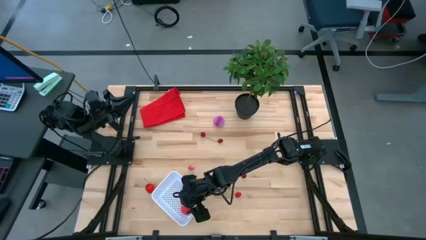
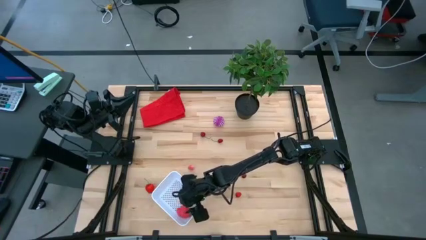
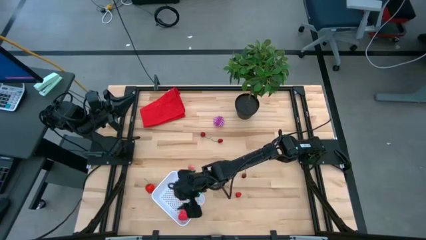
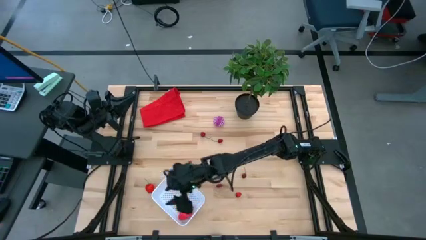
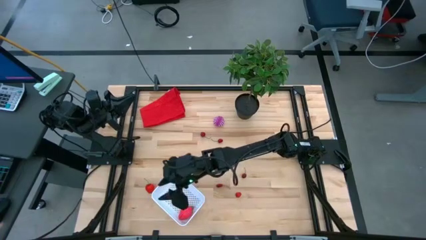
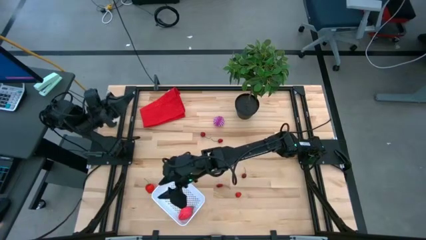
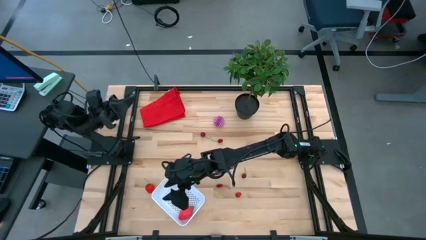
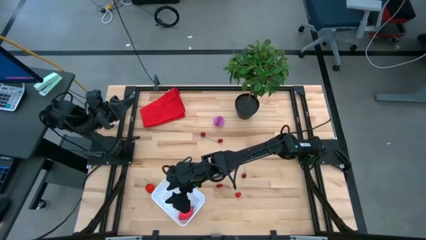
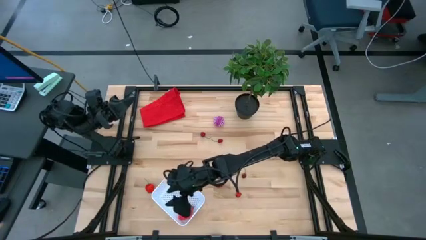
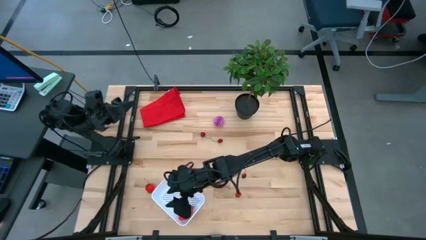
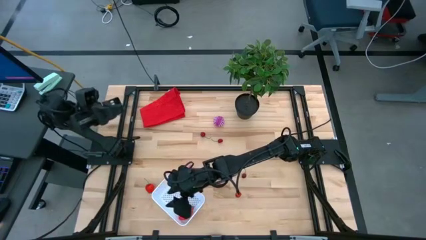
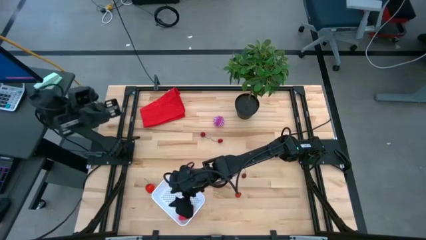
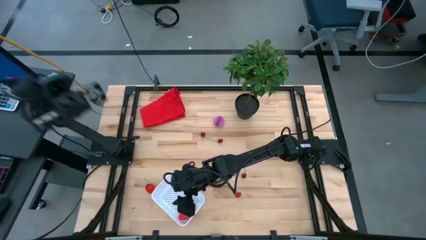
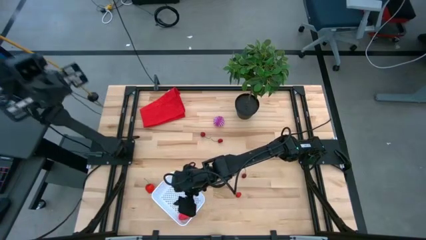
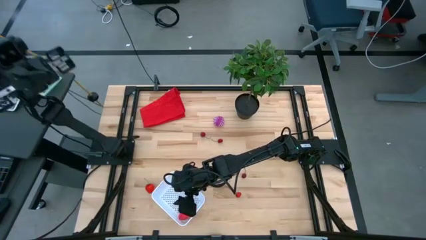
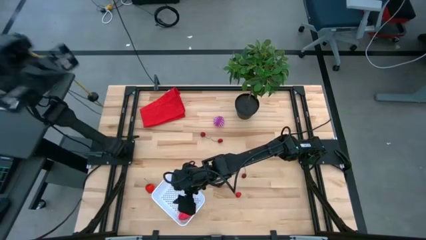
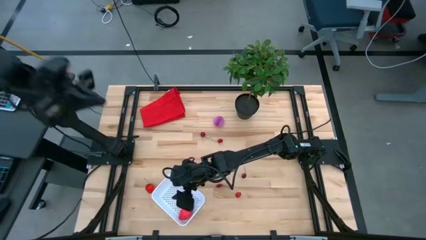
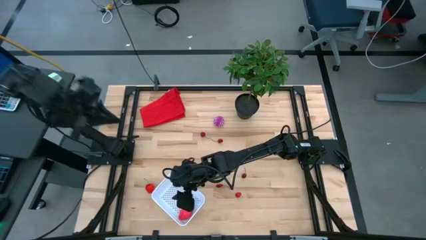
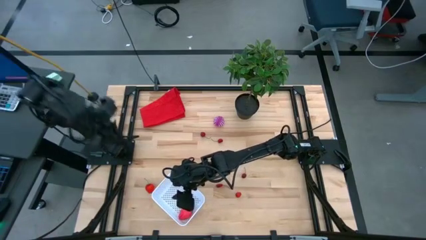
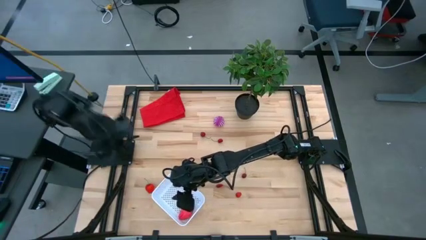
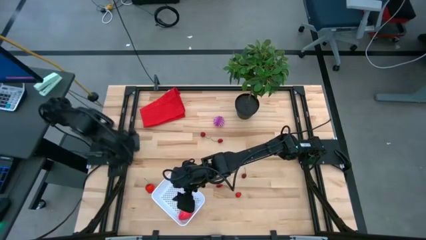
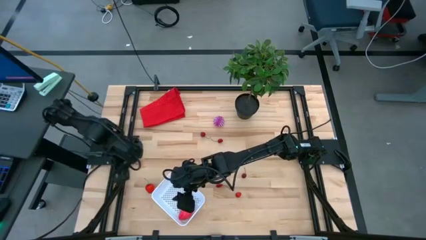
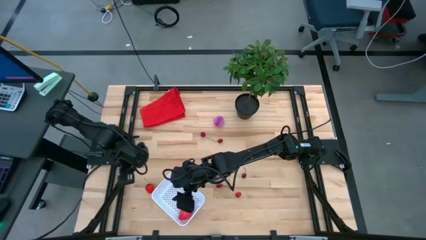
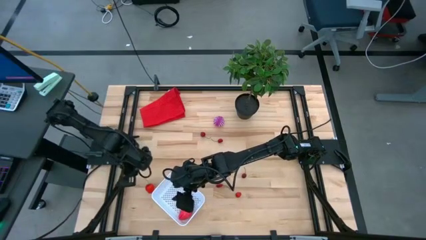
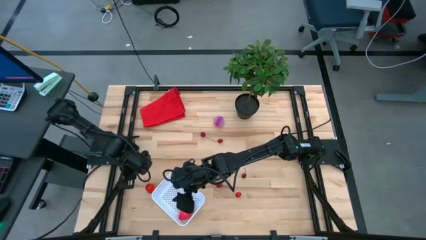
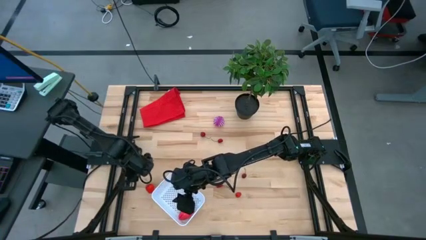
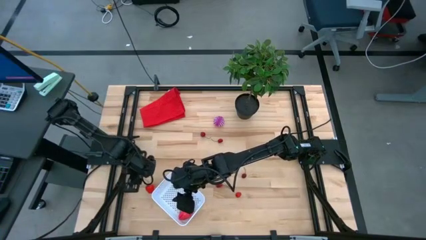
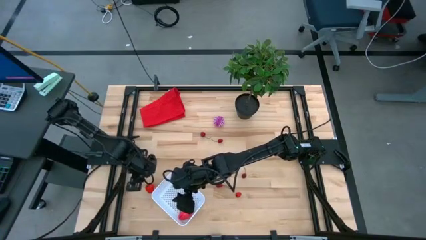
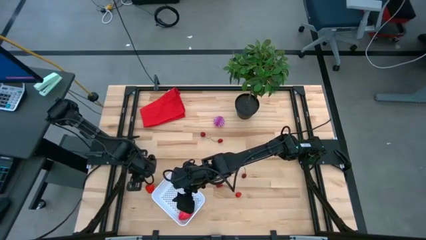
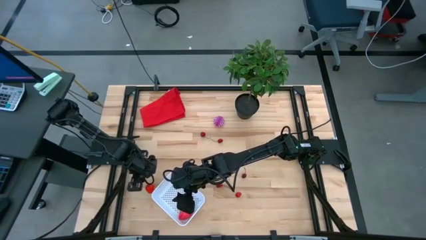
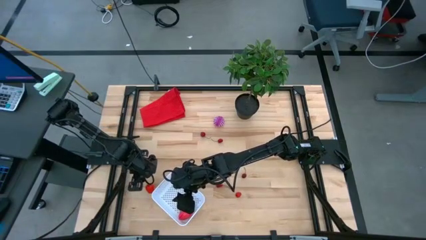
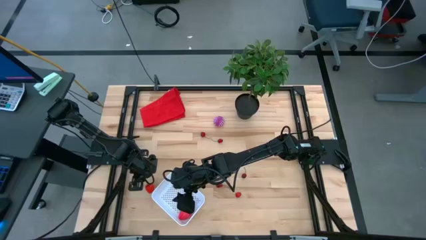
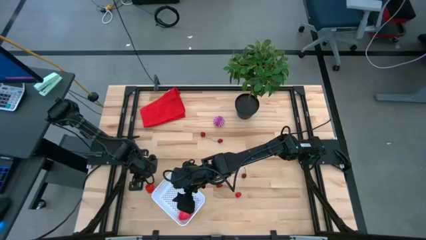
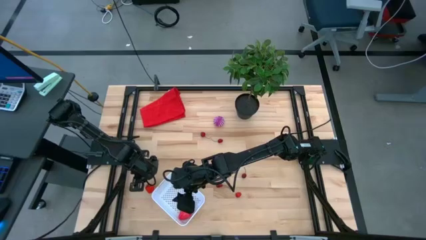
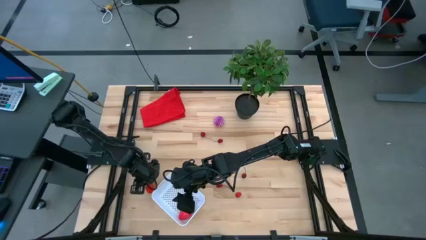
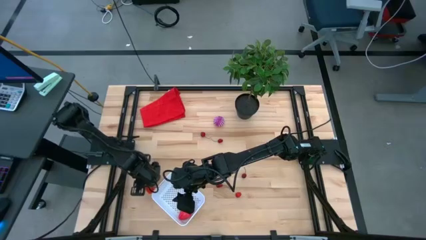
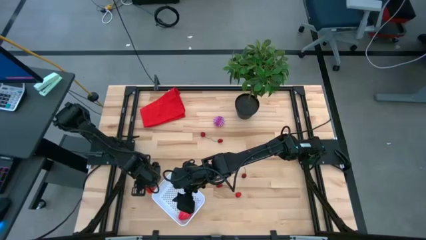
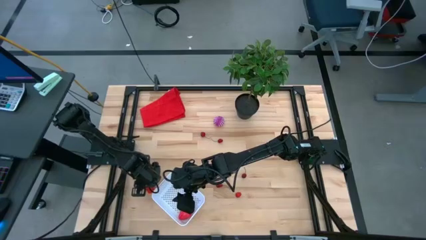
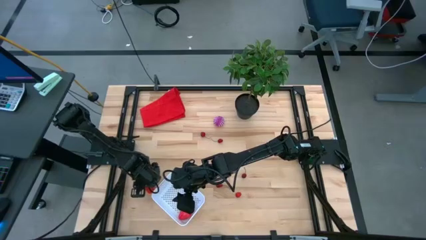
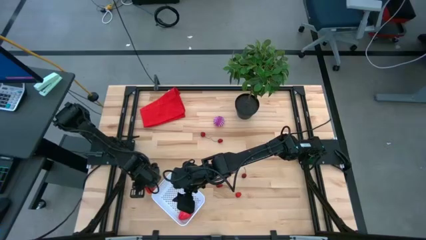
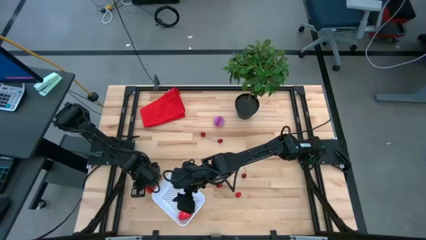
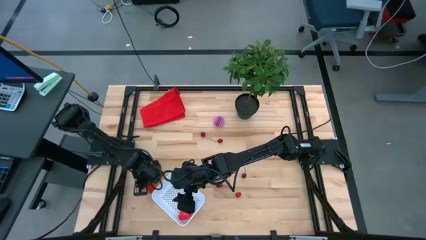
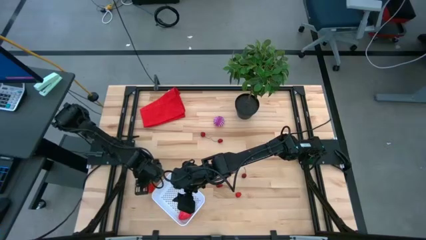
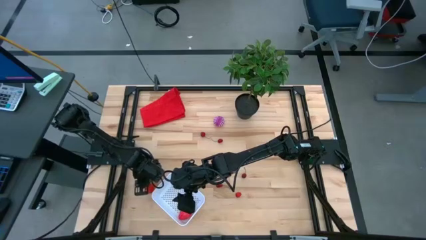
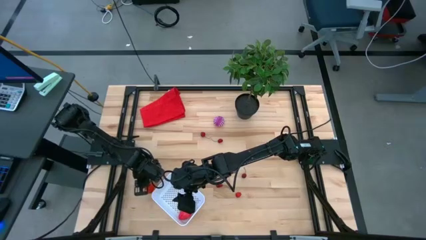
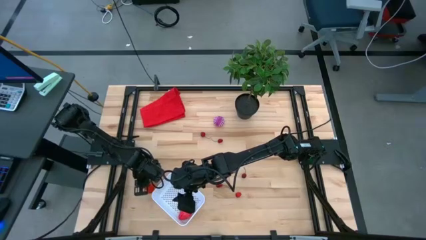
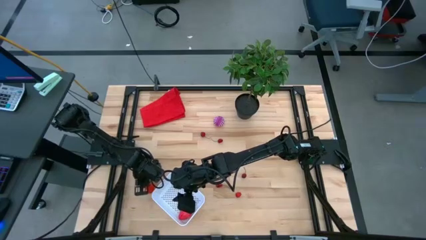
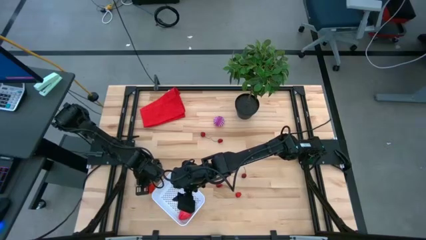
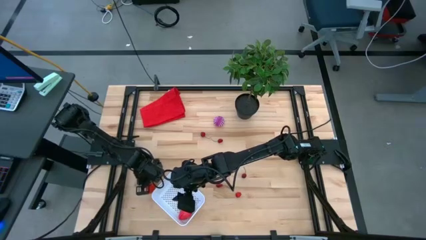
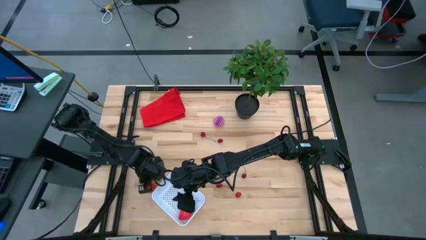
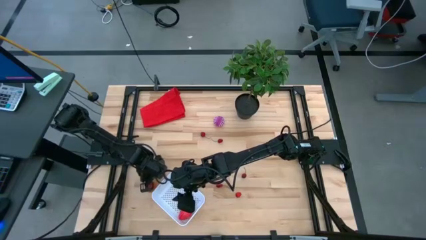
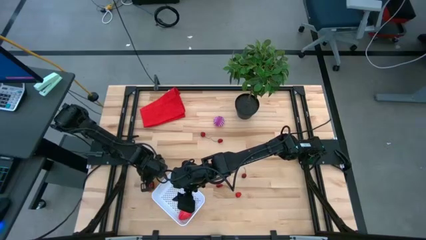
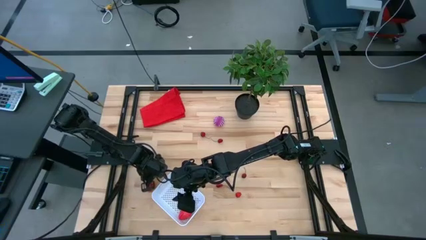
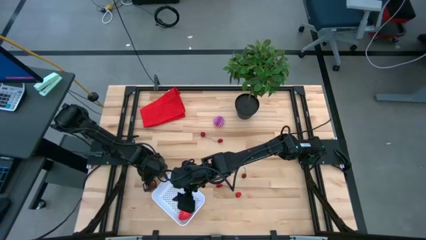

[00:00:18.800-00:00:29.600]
Task: Pick and placing Produce into tupperware
Put the strawberry in the basket

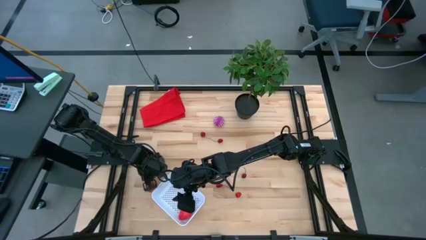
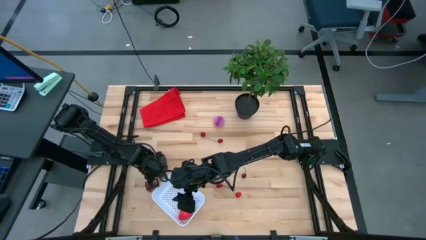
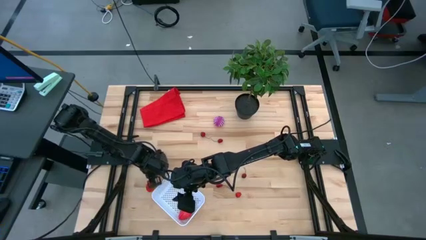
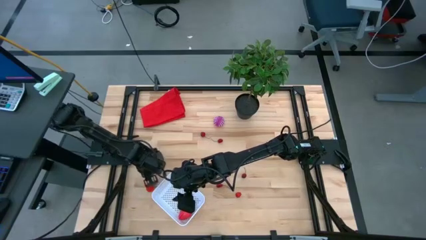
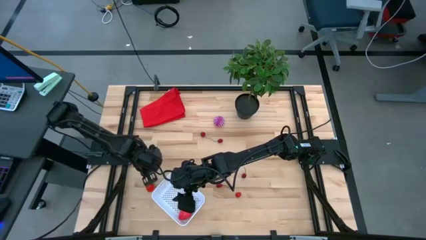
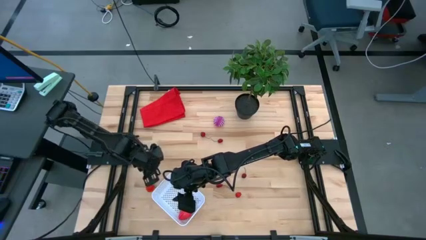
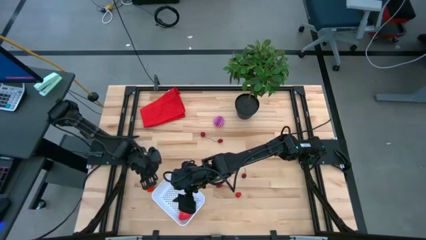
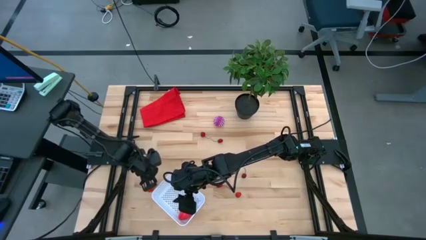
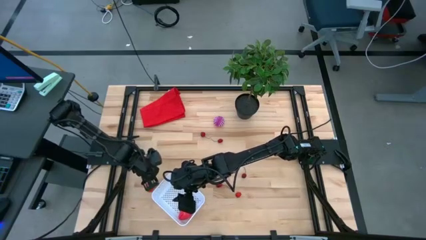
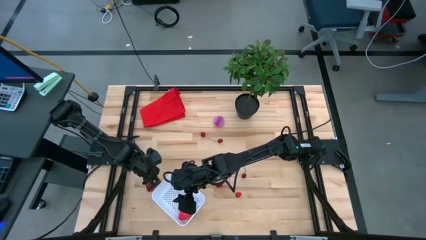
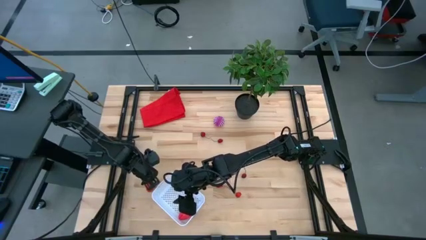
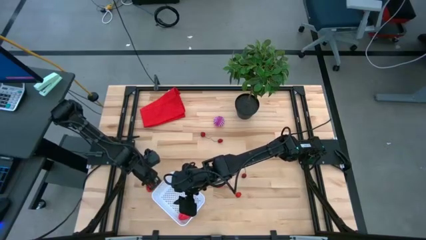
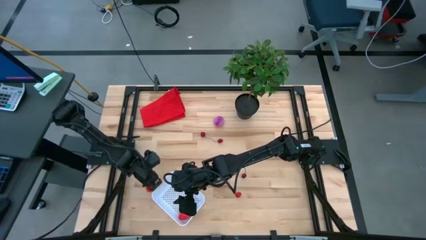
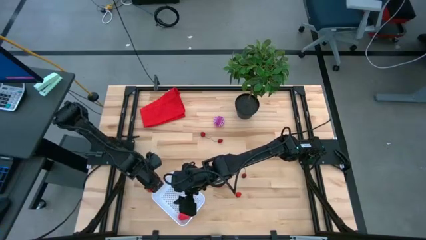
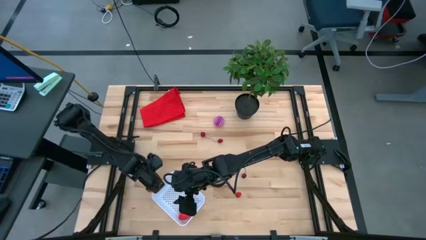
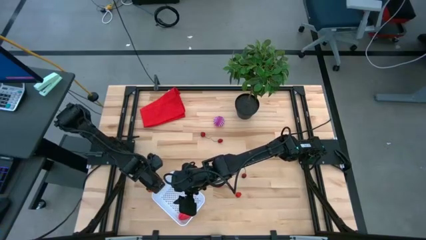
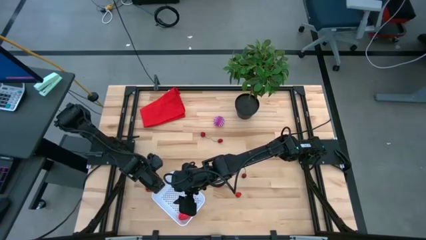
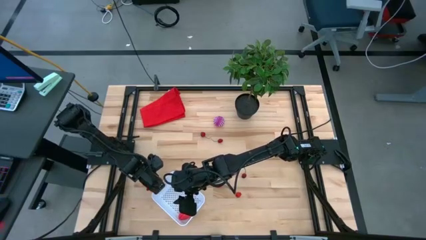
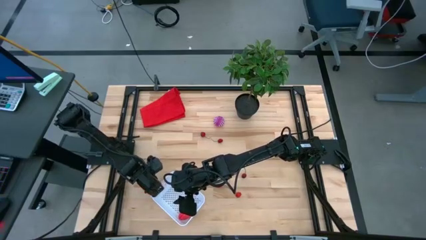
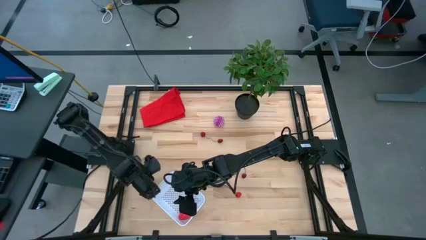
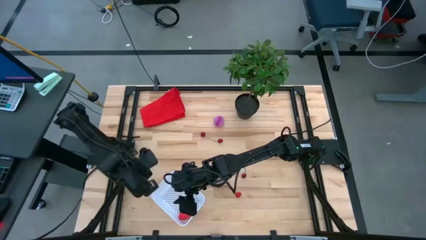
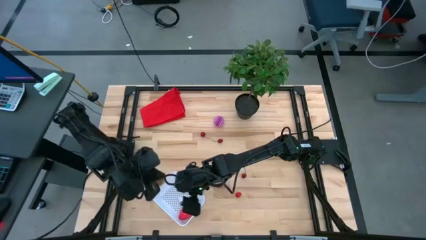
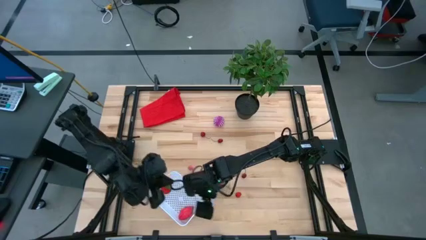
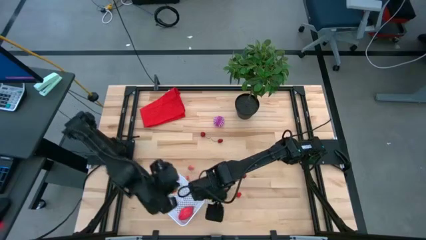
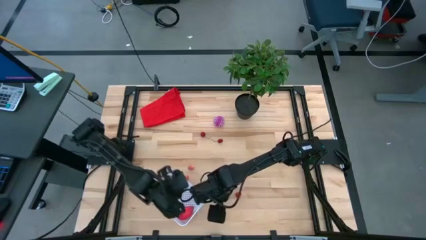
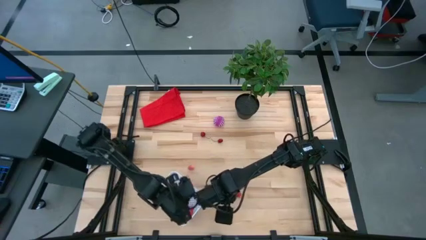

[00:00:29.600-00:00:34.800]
Put the strawberry in the basket

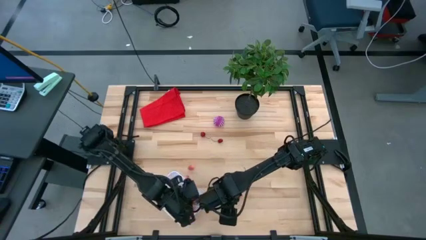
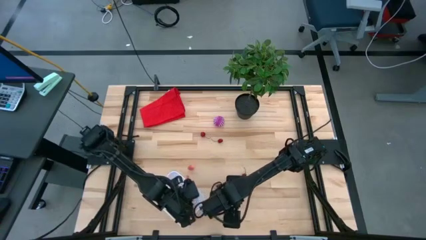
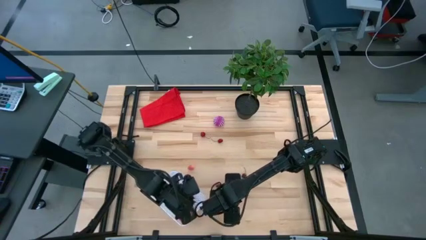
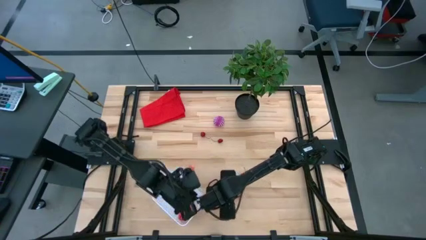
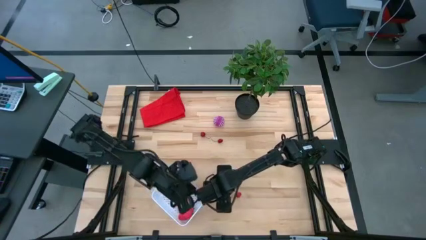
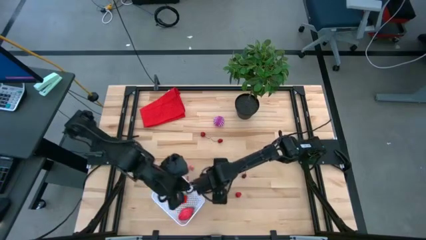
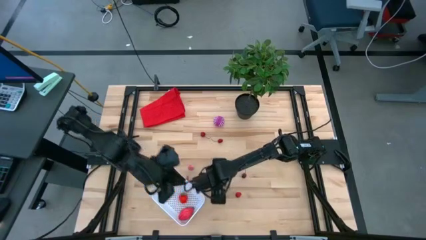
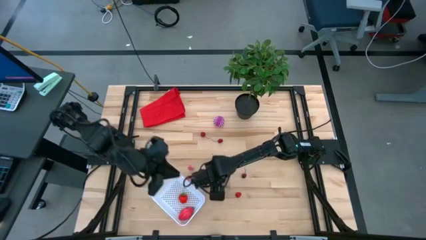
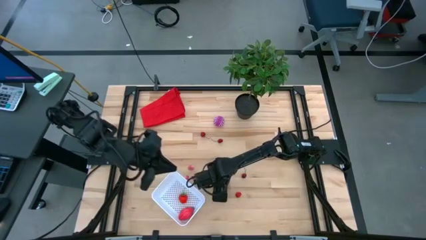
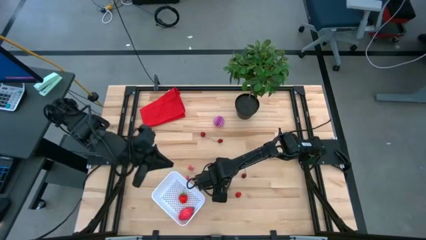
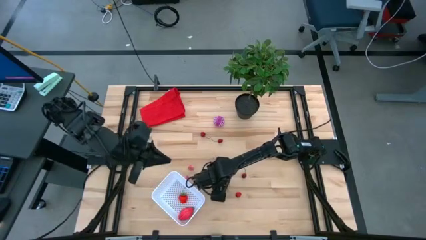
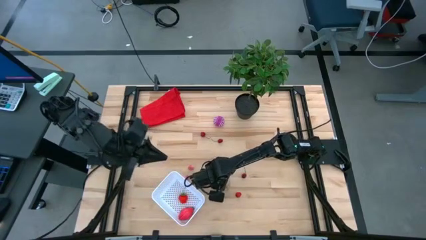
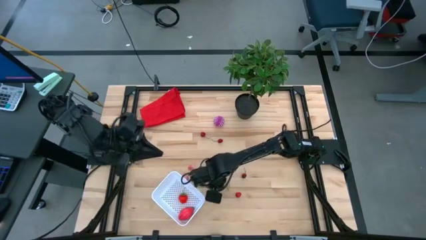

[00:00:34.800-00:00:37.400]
Put the cherry in the basket
